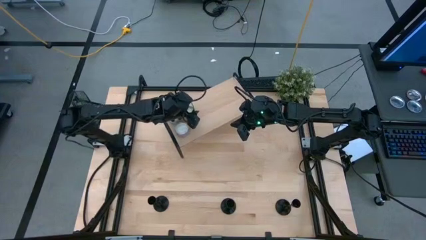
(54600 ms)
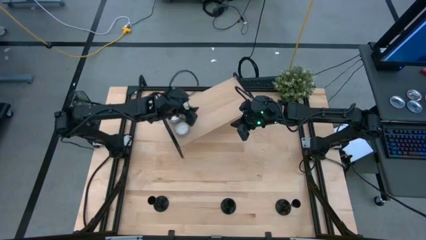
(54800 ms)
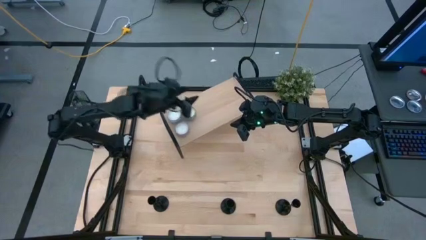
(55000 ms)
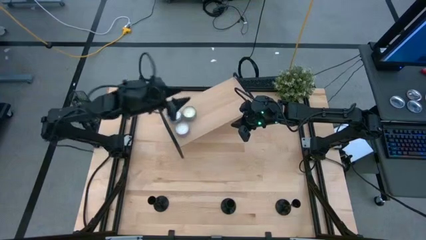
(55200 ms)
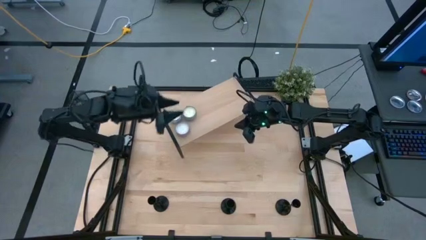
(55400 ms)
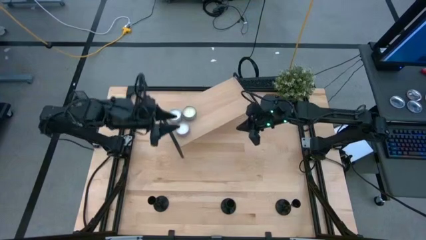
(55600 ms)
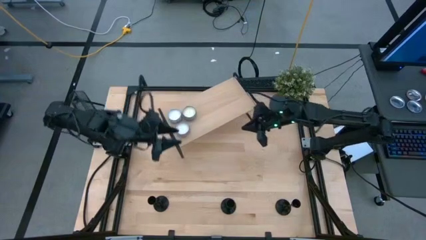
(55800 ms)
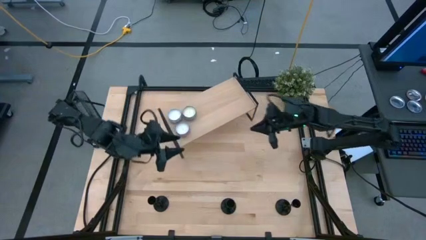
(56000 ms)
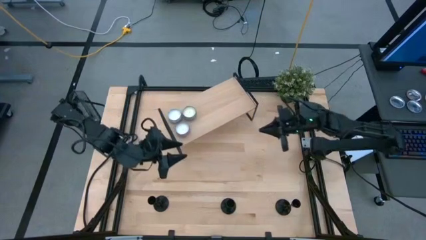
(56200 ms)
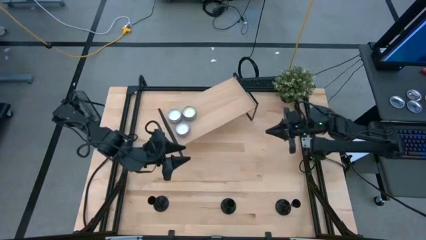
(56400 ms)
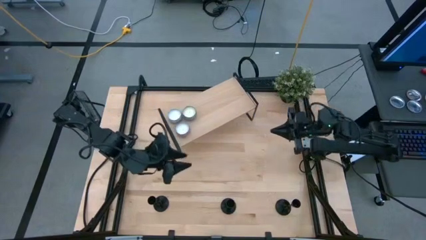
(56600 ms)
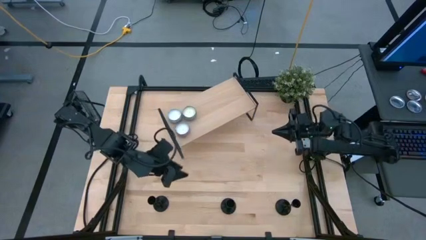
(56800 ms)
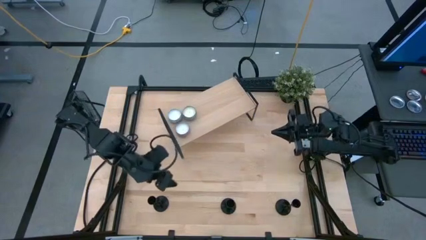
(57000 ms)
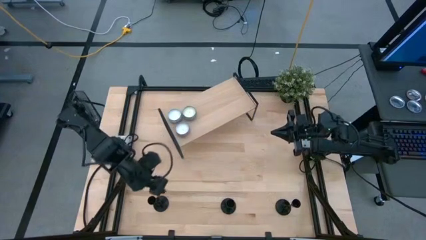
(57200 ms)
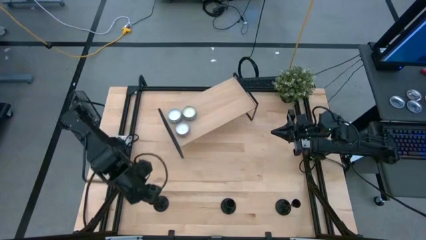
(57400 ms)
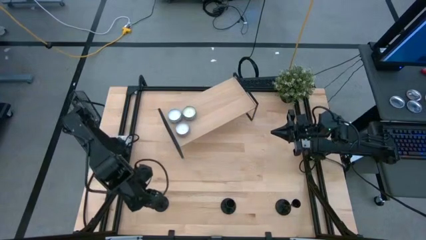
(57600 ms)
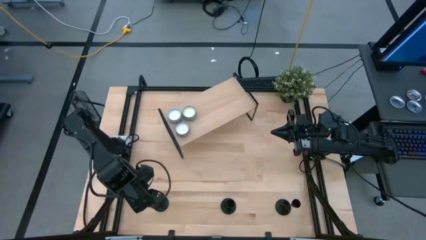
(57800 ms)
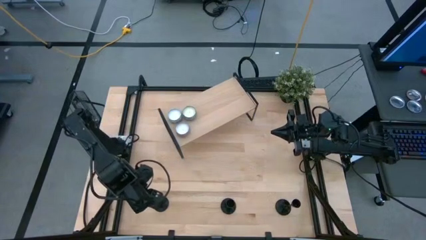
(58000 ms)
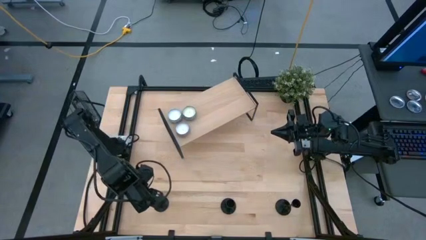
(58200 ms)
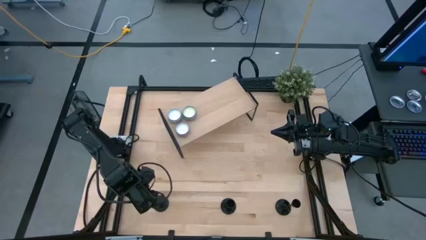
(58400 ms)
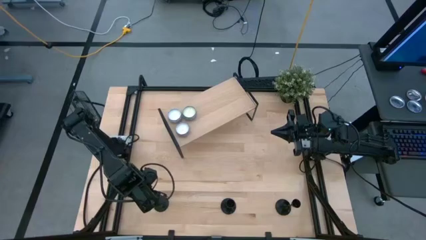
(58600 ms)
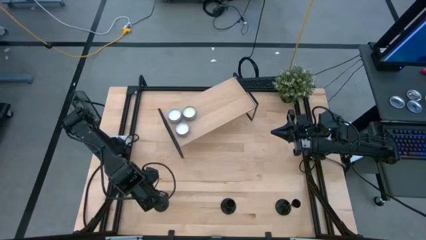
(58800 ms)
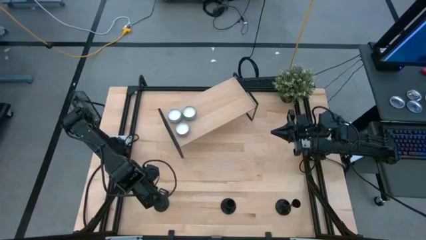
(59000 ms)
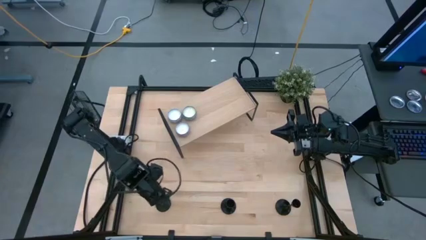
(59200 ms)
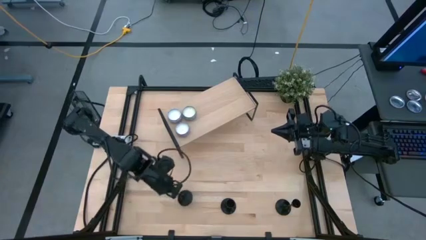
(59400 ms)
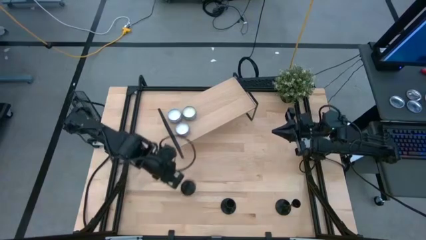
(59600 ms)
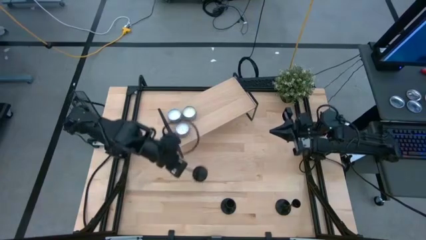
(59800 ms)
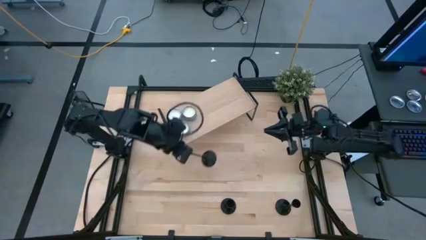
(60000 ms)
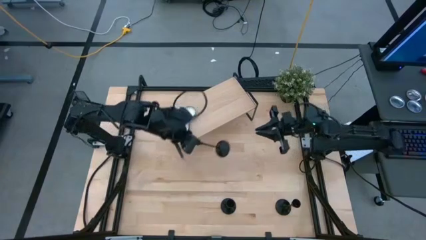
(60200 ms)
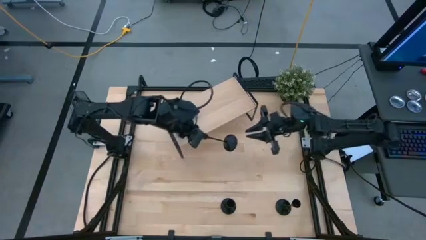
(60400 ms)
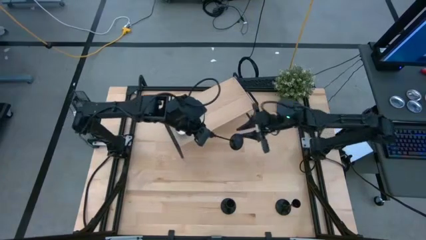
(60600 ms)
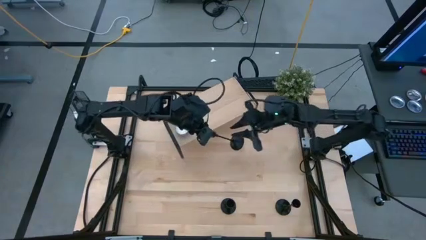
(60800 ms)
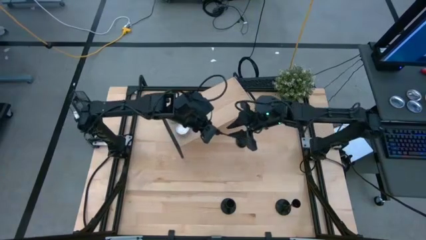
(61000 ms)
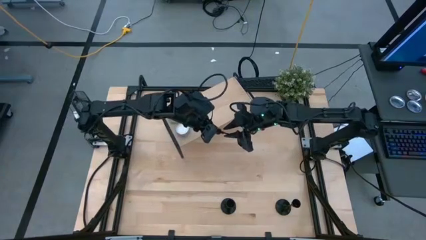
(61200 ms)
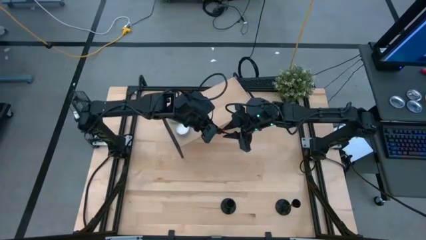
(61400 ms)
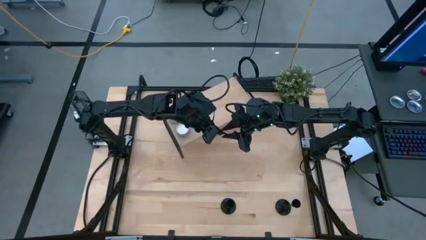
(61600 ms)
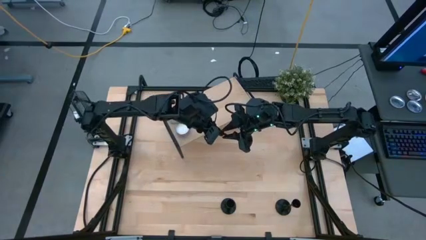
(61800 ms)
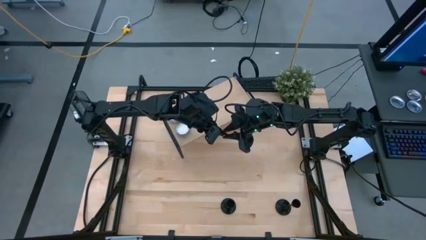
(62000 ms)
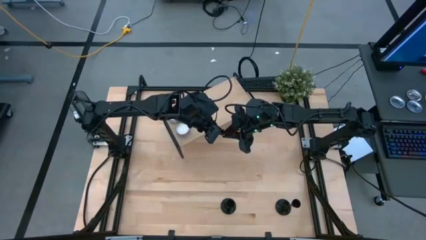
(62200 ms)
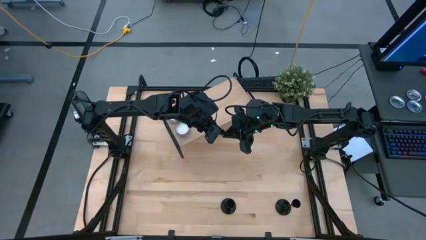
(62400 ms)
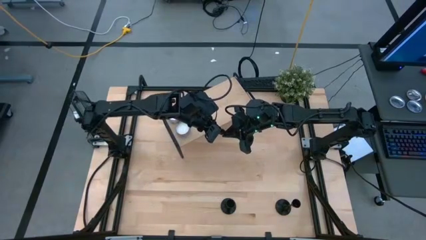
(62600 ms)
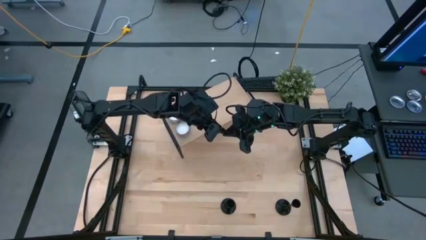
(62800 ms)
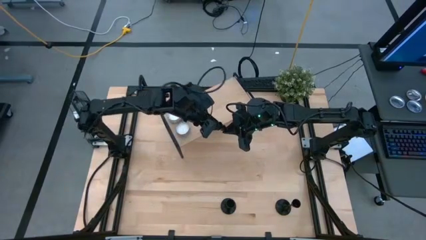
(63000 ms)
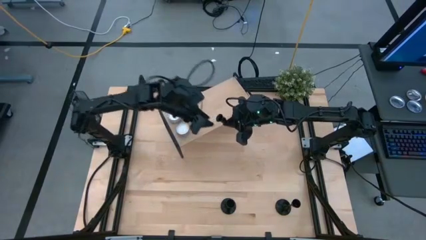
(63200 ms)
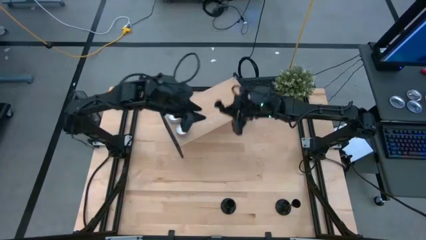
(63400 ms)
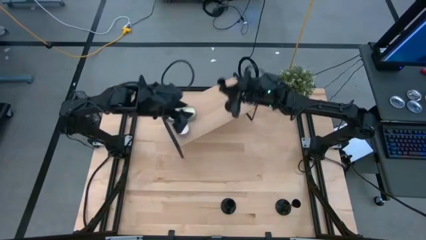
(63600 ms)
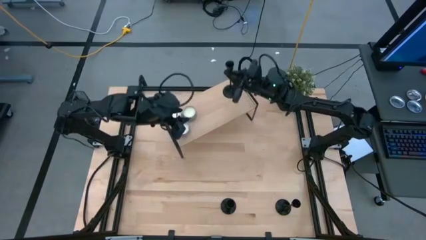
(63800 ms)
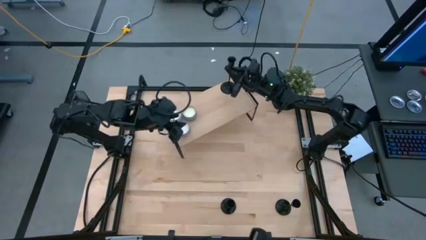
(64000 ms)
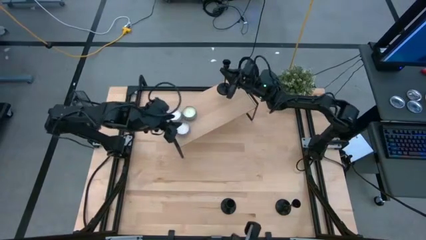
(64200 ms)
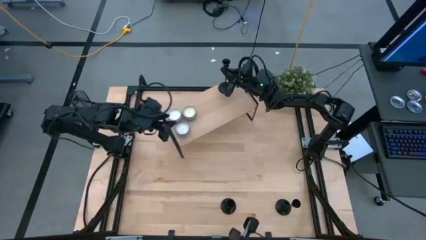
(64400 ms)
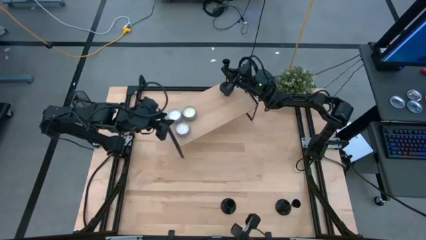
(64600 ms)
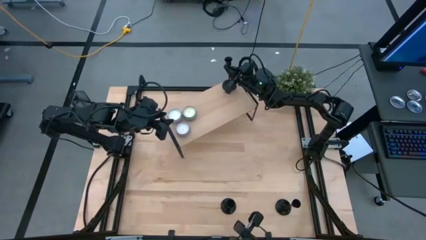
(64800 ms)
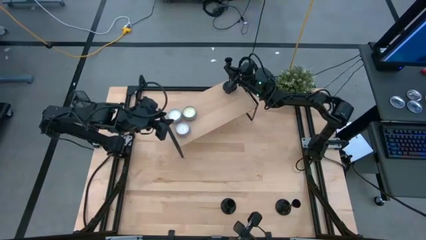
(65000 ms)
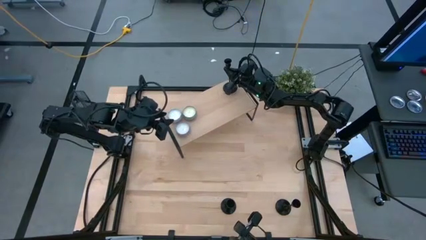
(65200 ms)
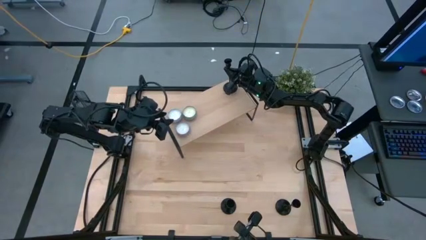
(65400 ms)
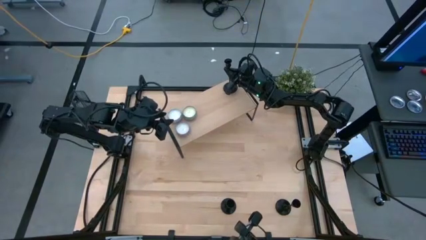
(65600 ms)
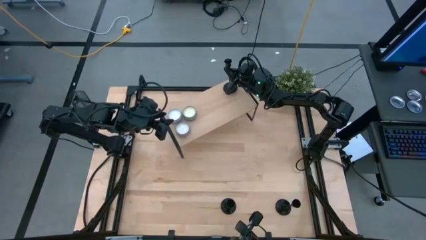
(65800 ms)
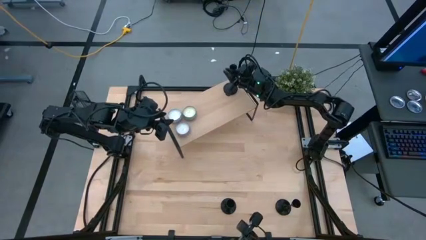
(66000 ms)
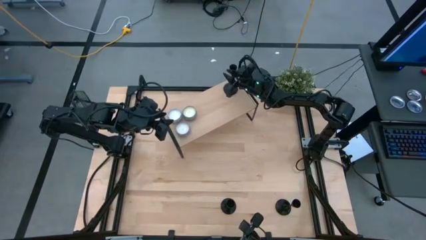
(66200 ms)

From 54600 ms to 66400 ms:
Task: Pick & Place candle stick holders
Put the left black candle holder on the shelf

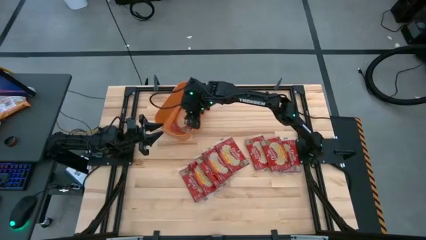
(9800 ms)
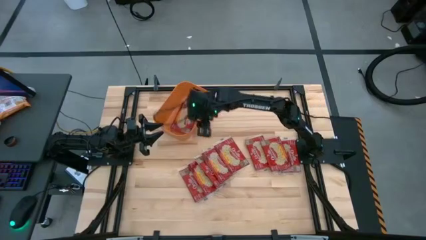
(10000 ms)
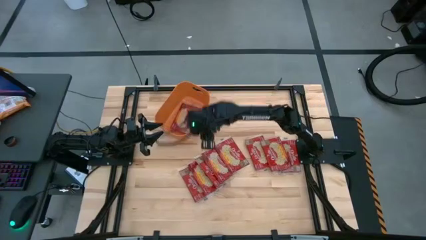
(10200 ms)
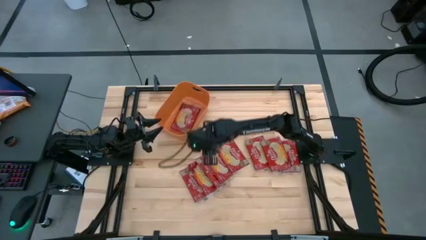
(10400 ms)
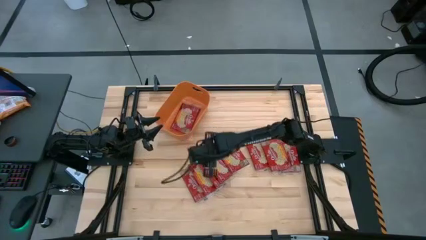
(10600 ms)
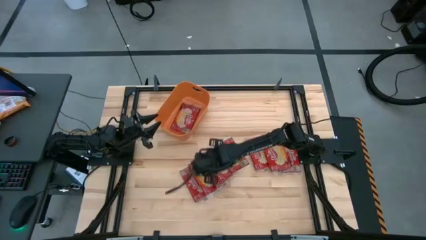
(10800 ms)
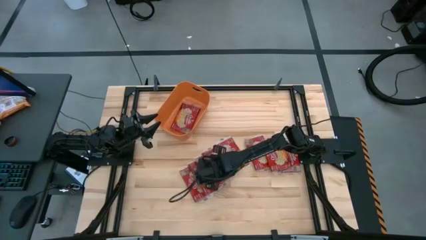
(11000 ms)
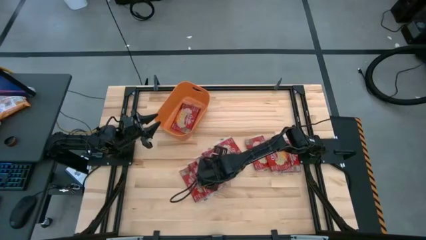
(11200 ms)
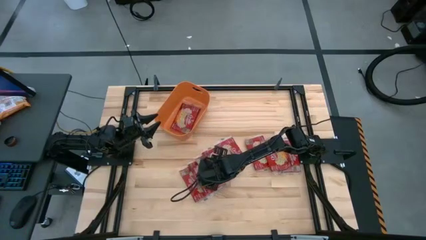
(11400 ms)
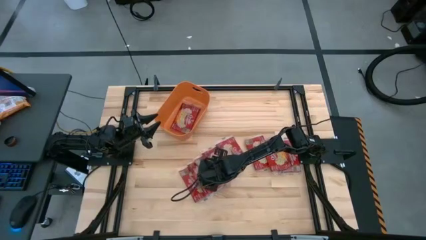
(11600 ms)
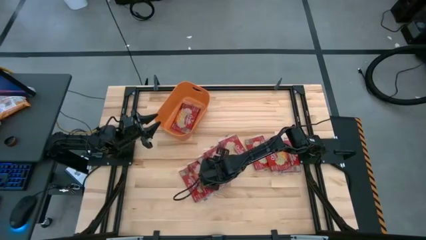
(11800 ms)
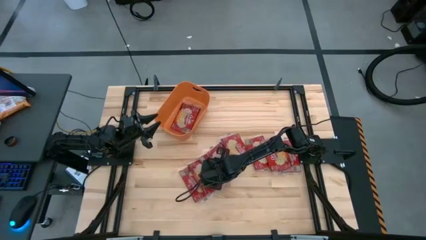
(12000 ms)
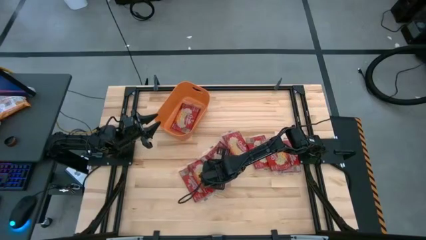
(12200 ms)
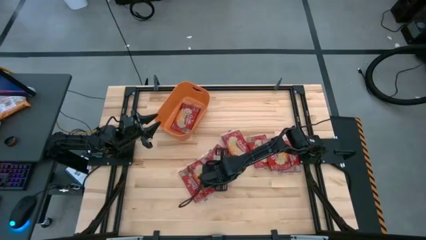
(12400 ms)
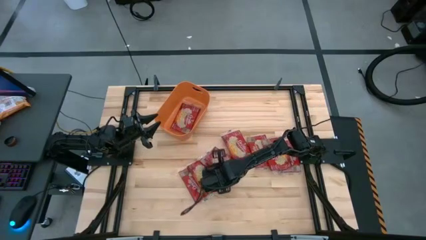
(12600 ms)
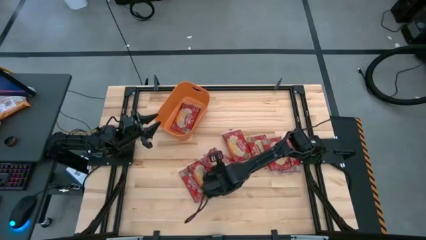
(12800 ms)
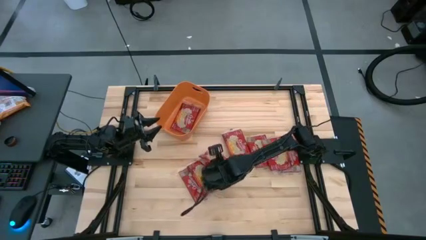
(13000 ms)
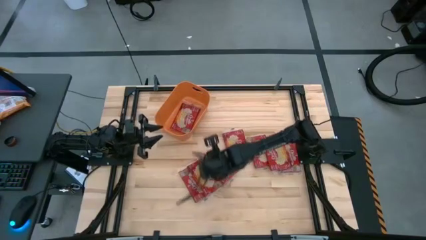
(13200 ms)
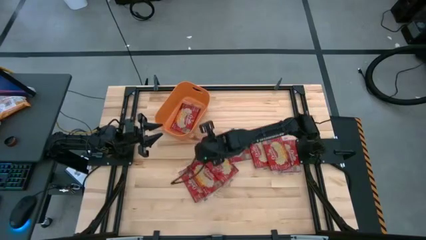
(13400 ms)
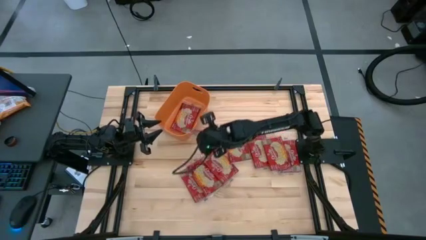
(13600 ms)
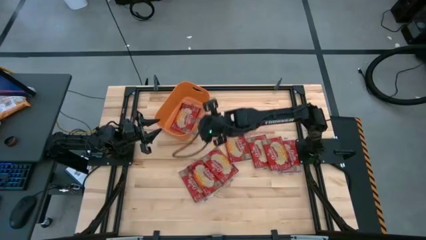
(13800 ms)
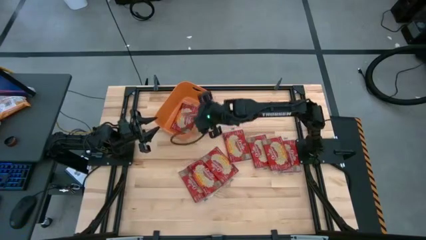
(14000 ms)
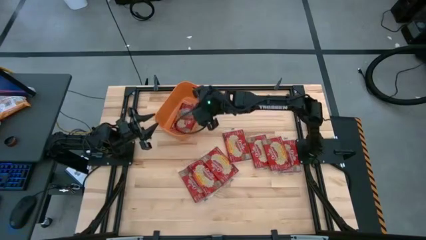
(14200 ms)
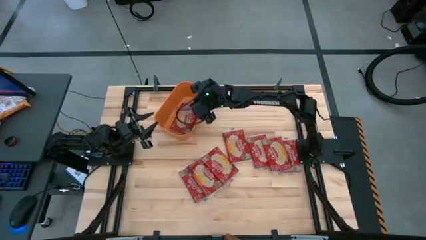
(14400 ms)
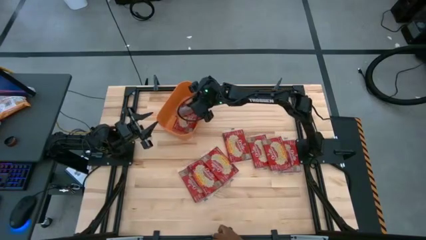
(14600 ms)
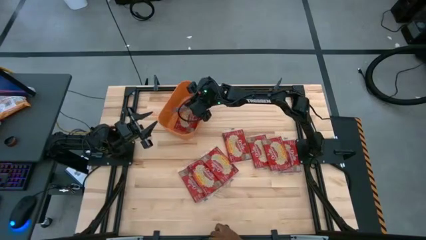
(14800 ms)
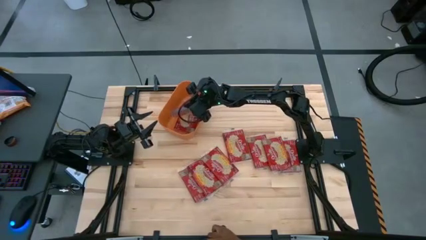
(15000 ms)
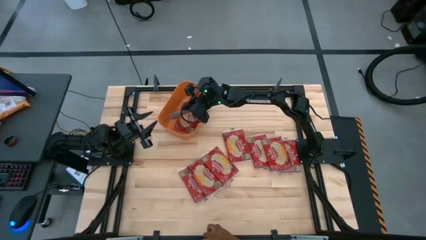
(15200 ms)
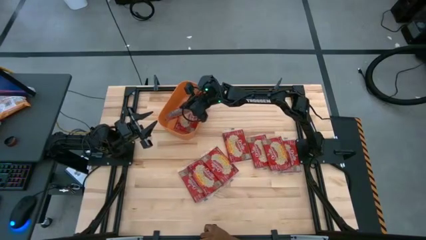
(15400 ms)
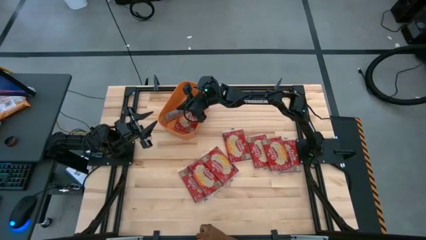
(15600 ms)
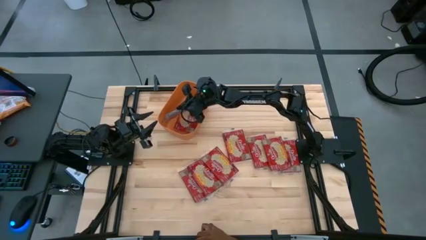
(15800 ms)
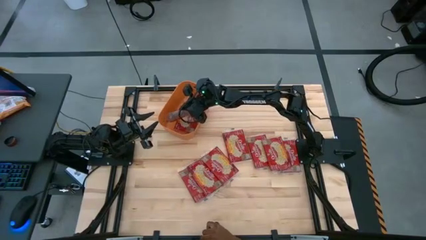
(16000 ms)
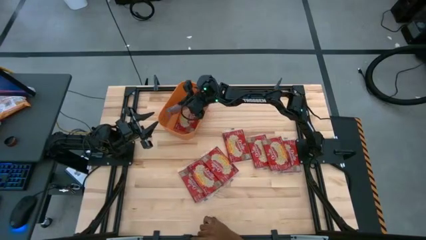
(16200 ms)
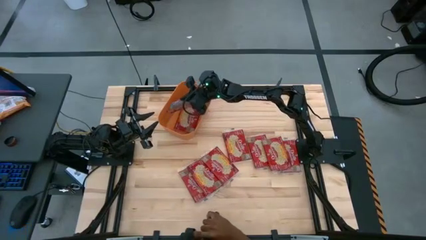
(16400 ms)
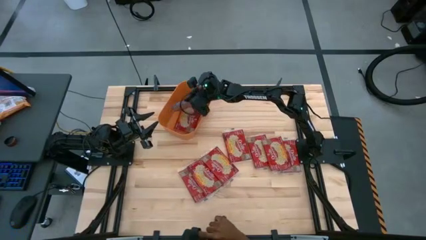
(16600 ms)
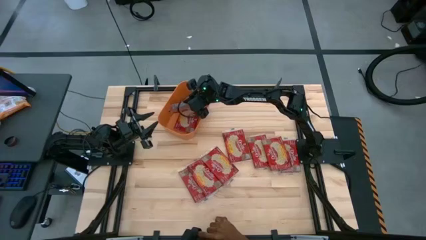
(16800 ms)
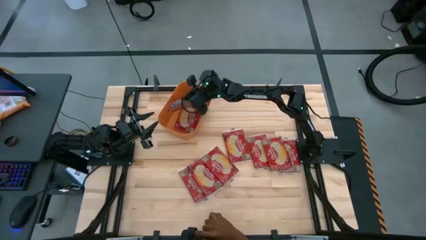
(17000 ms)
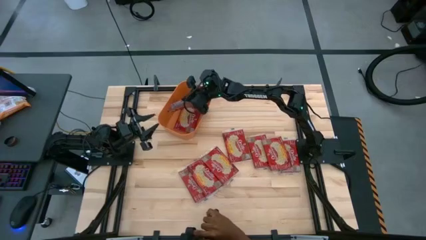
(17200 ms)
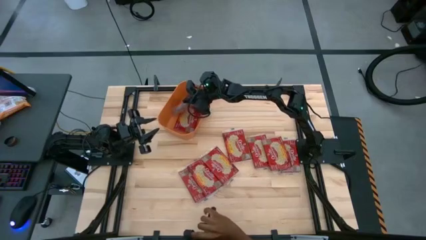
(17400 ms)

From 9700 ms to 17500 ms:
Task: Sort popcorn bags into baskets
Put the red popcorn bag into the orange bin
